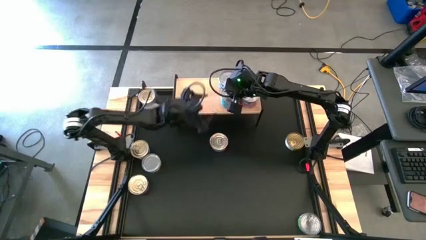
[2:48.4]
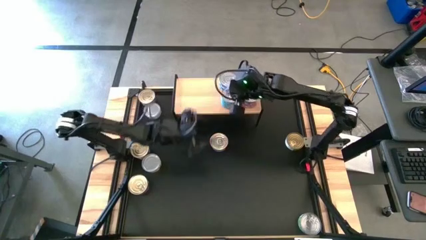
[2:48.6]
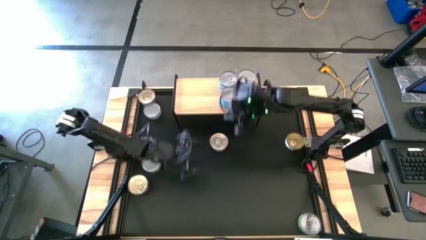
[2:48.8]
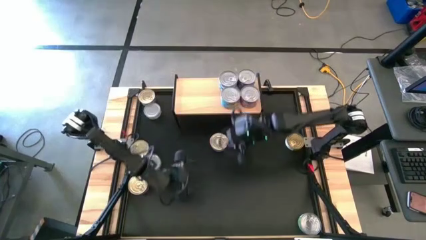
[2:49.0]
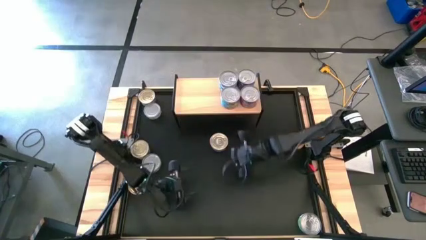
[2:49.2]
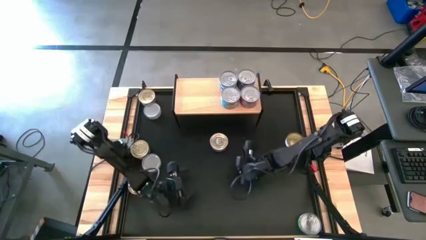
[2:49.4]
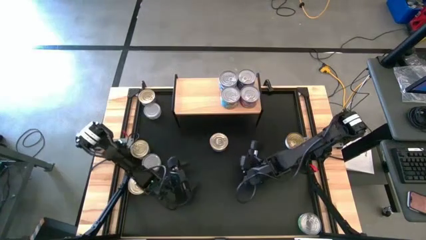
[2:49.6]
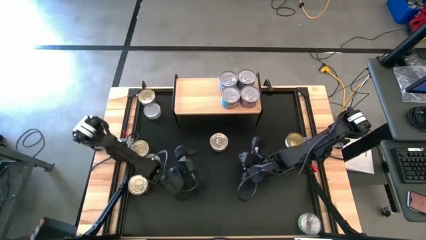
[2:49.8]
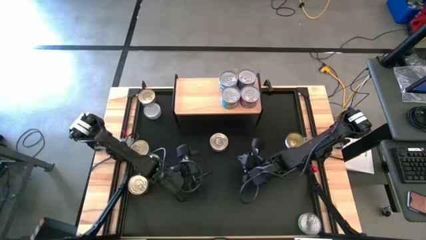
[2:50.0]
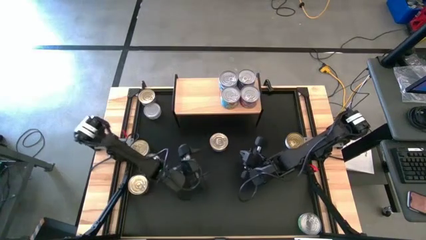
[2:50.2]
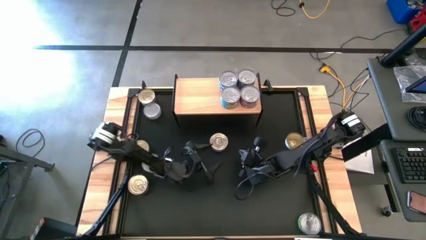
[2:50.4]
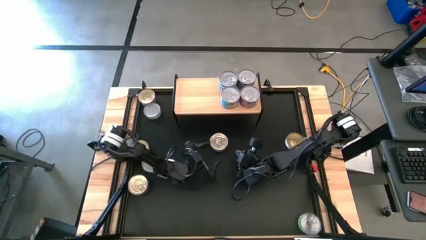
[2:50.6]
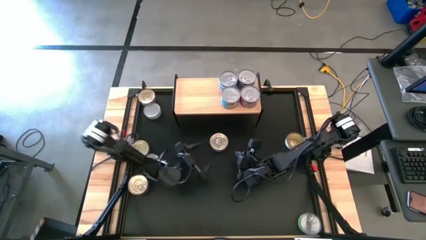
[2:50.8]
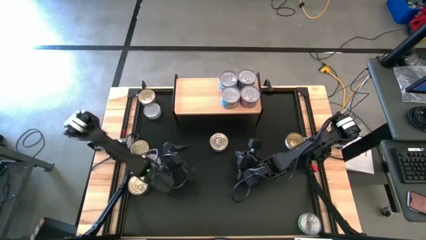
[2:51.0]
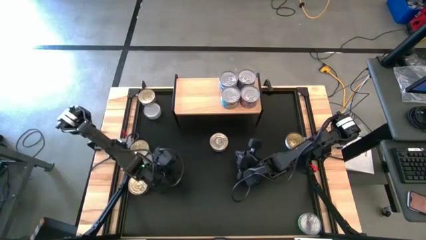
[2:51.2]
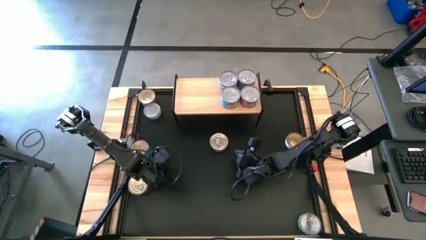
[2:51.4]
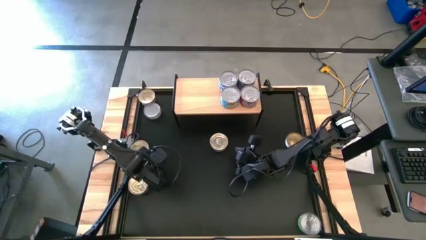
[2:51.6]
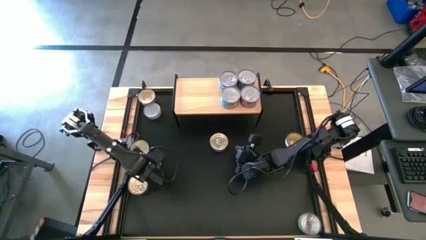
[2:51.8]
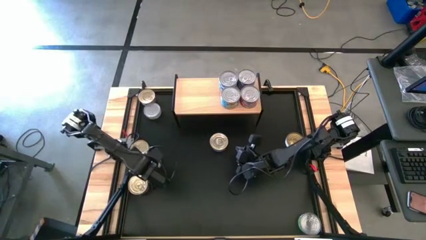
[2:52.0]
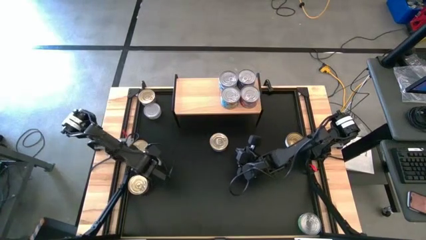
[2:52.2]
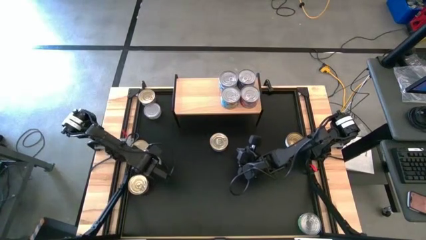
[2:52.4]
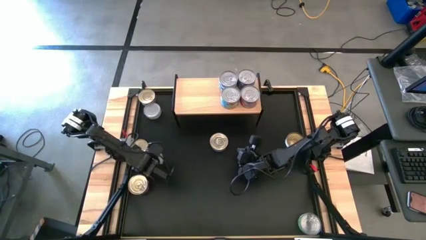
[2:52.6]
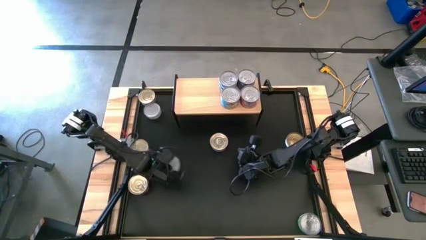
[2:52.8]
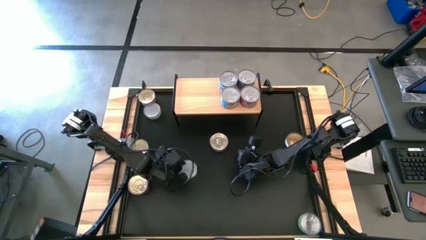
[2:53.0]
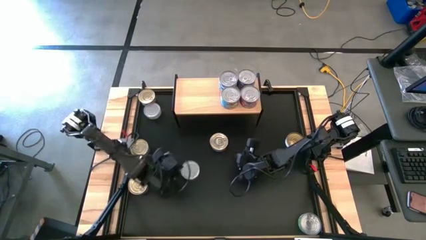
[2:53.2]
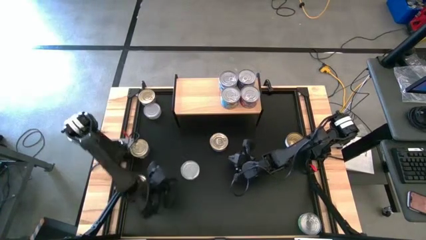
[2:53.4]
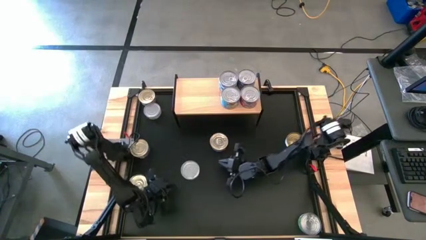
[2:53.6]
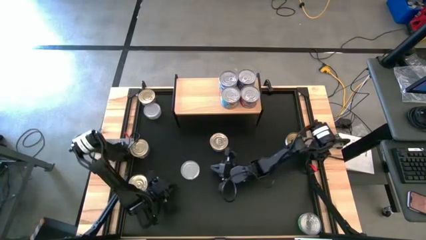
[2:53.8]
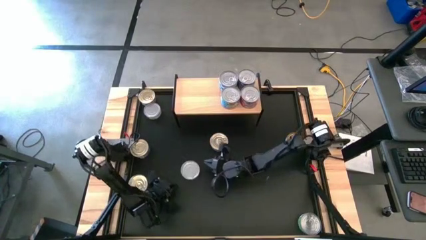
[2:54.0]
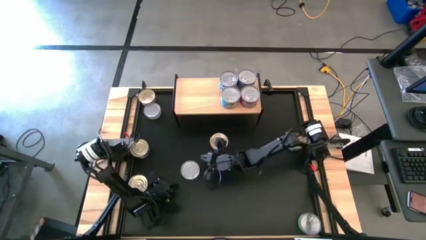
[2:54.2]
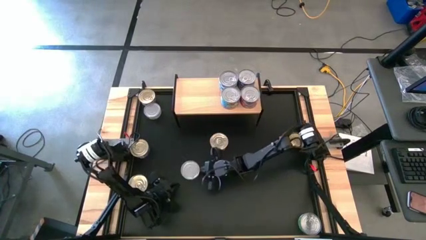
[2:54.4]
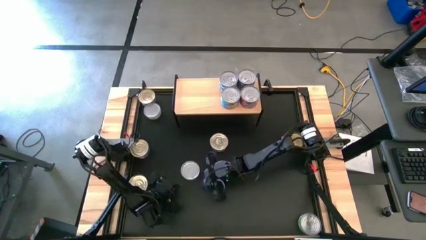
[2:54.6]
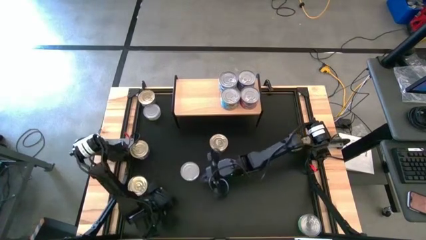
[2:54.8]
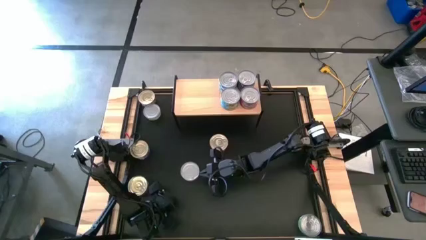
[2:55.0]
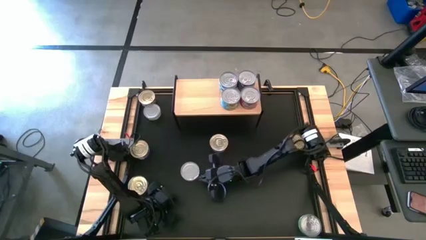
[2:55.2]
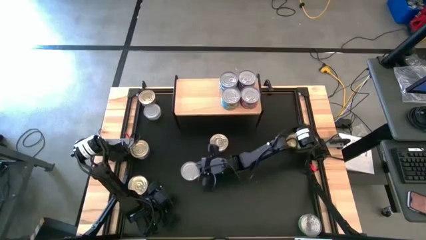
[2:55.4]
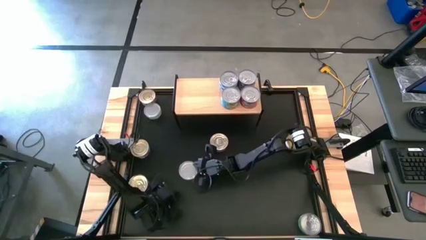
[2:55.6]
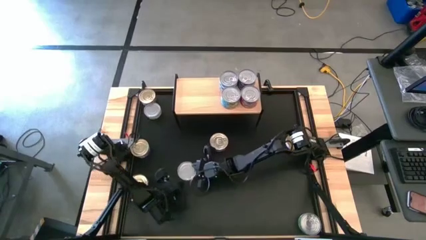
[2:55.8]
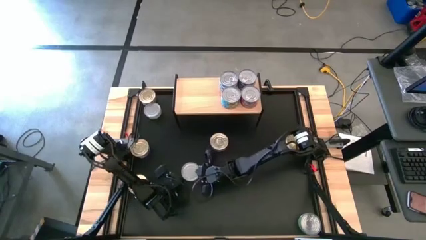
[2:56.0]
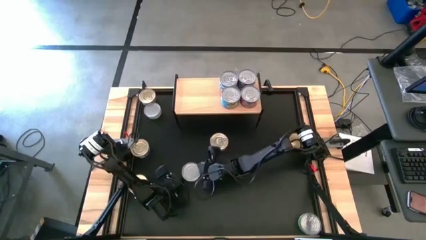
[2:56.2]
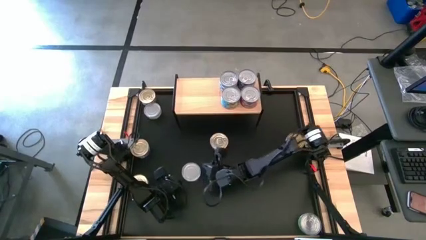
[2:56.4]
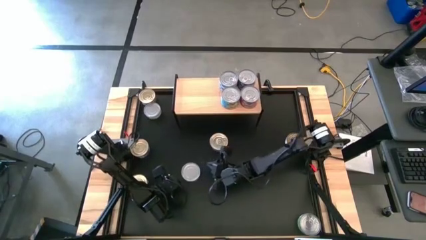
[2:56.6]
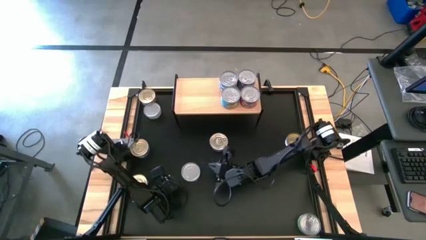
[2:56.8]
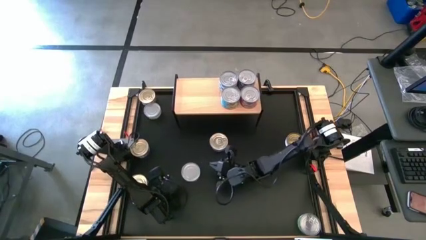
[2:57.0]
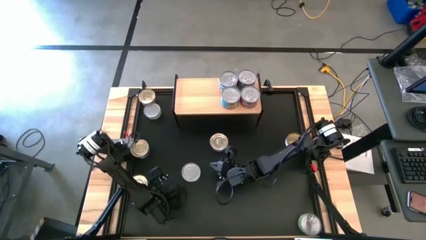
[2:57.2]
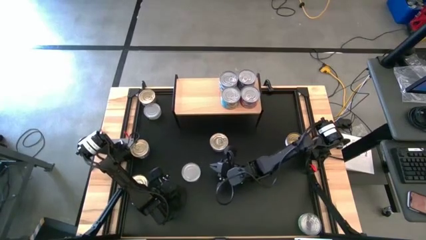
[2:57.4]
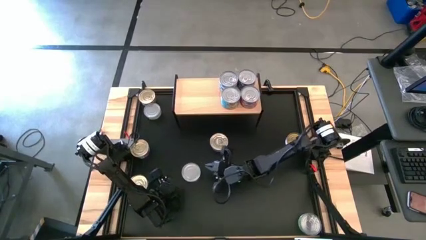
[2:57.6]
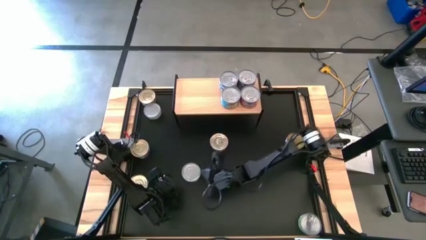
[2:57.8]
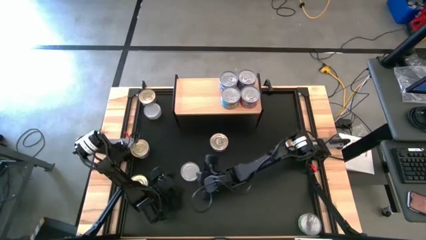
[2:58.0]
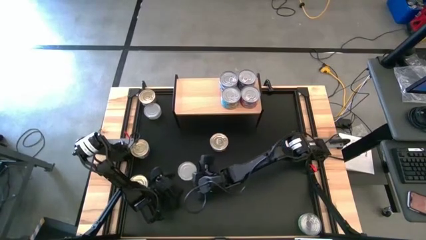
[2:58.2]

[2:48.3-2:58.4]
Task: Stack canned seafood by type on shelf
Move the green white tuna can to the center of the table

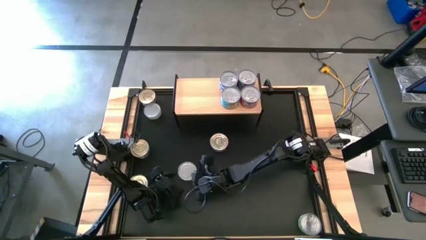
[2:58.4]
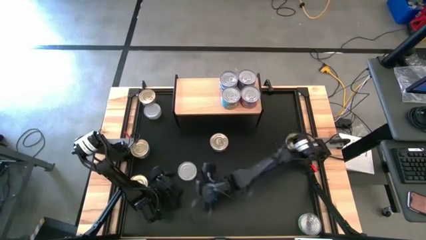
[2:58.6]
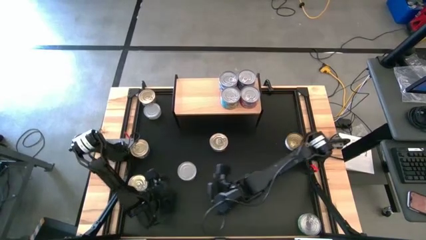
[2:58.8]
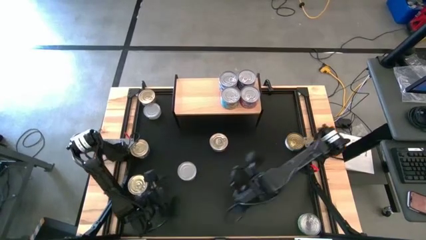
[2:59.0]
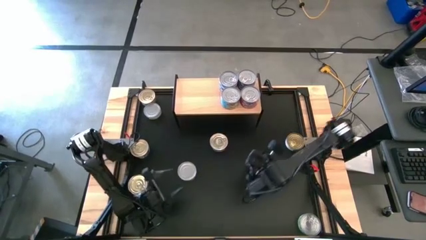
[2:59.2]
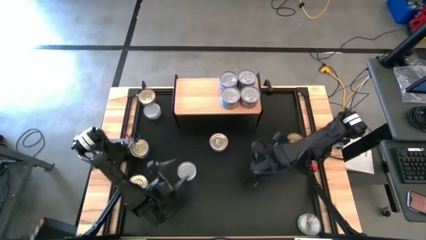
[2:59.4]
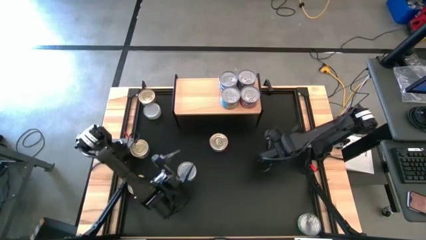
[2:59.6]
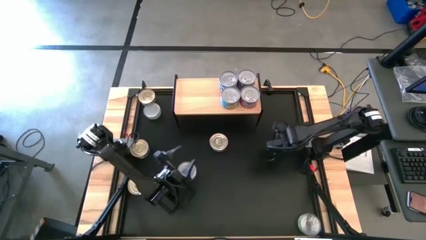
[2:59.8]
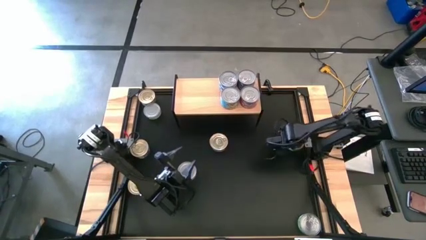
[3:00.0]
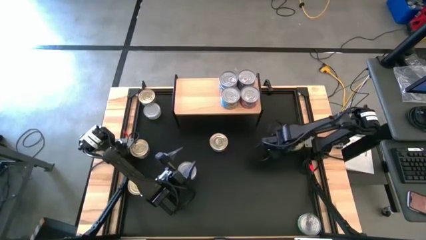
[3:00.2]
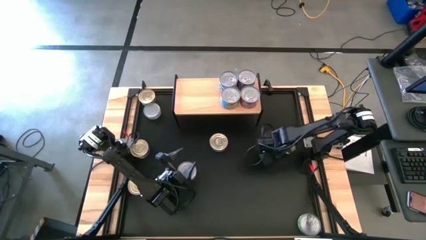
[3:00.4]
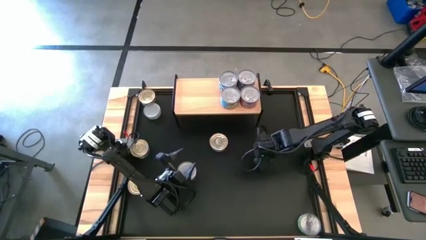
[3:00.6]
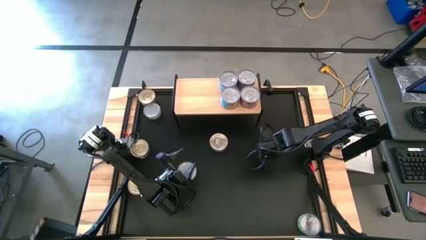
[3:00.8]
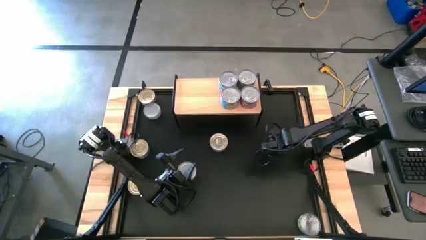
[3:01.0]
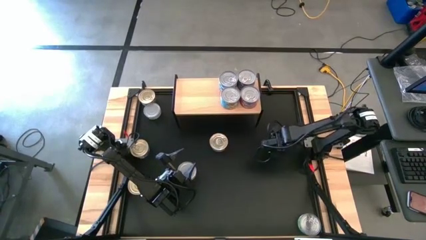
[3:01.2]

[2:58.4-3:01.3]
Put the green tuna can on the shelf
